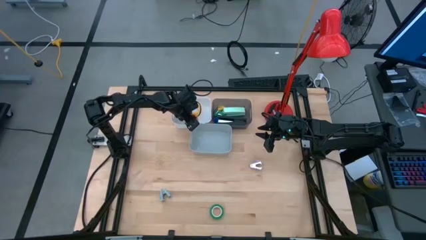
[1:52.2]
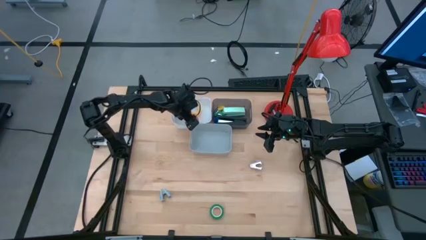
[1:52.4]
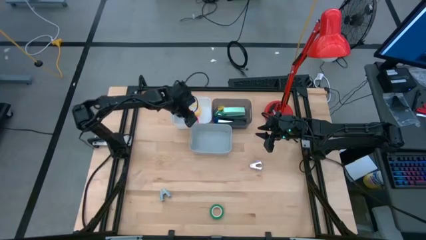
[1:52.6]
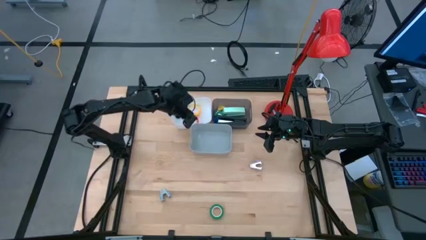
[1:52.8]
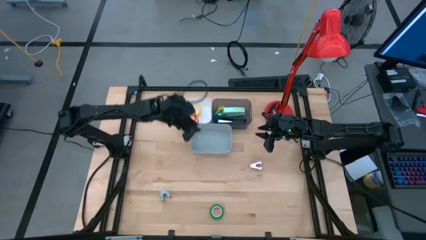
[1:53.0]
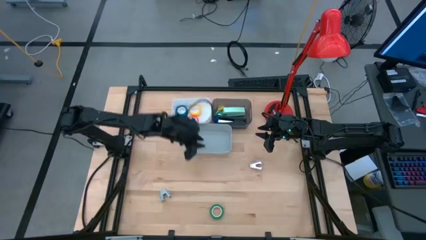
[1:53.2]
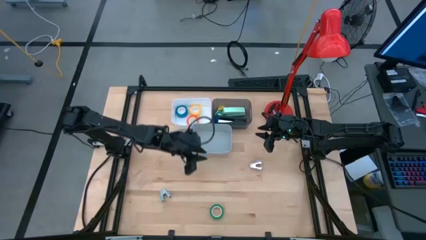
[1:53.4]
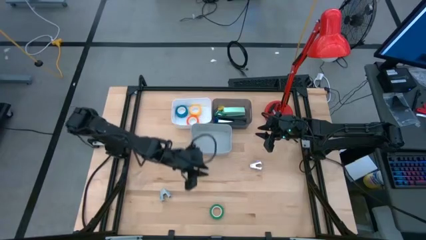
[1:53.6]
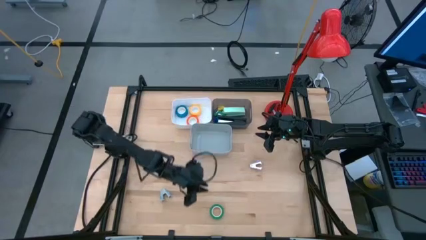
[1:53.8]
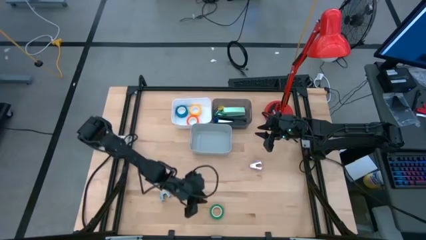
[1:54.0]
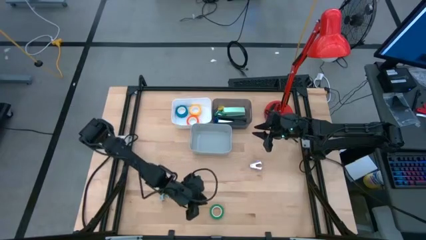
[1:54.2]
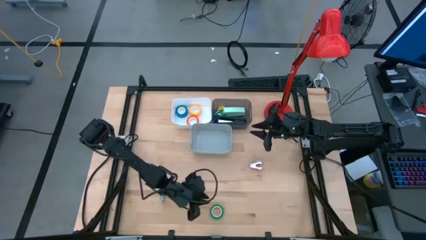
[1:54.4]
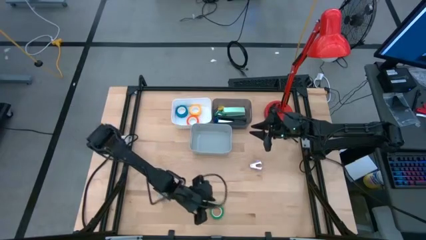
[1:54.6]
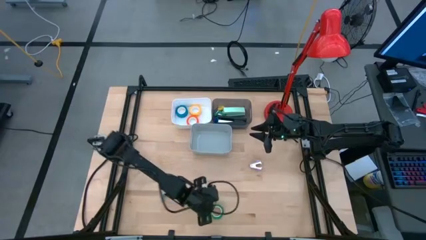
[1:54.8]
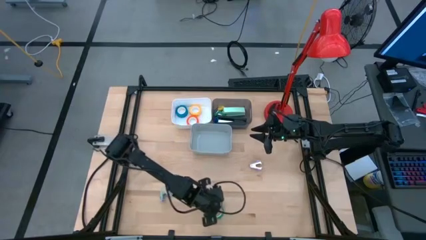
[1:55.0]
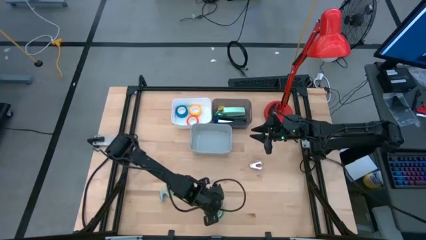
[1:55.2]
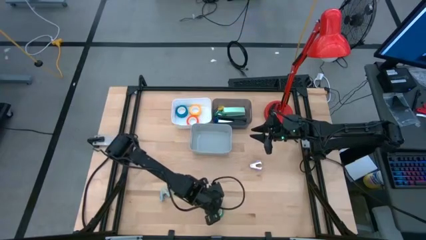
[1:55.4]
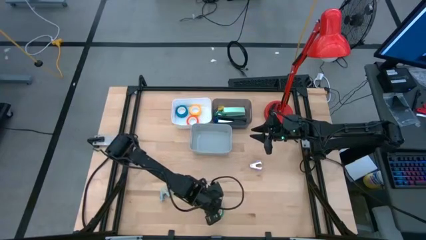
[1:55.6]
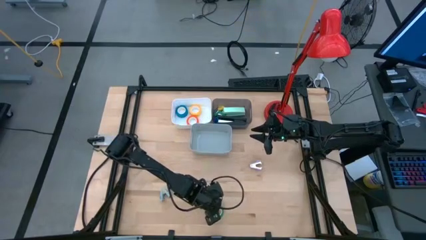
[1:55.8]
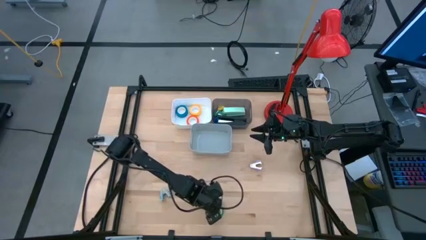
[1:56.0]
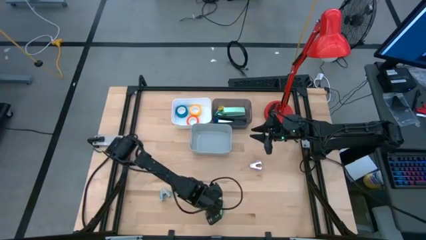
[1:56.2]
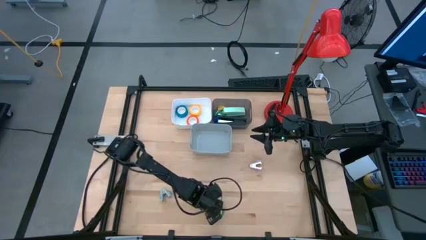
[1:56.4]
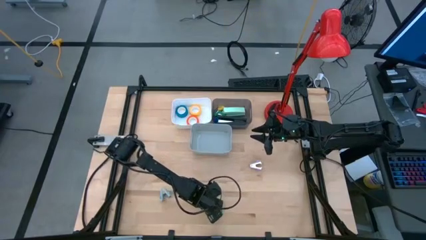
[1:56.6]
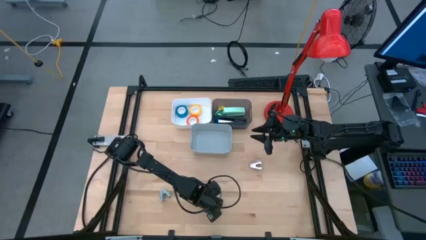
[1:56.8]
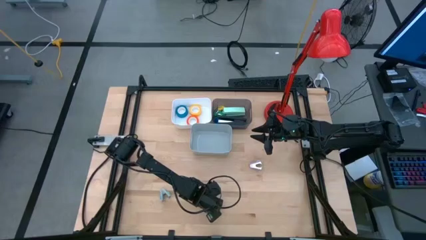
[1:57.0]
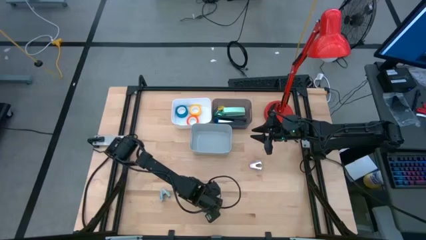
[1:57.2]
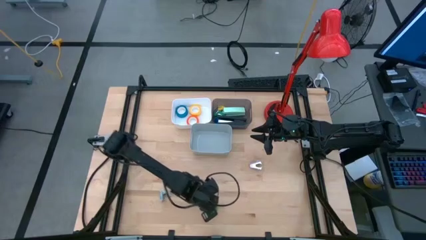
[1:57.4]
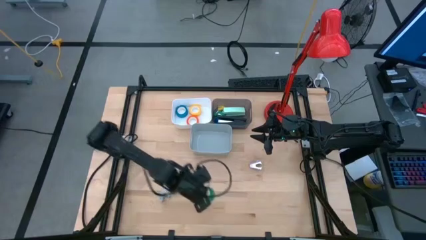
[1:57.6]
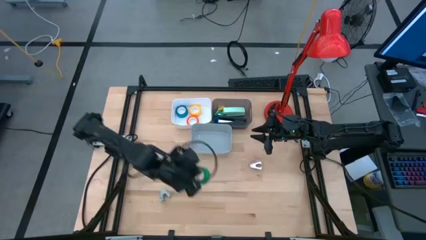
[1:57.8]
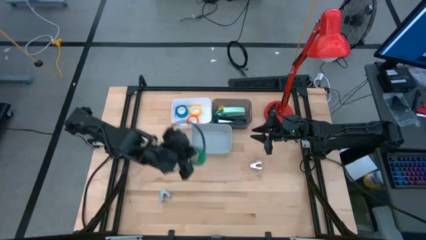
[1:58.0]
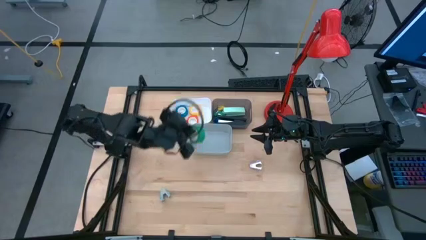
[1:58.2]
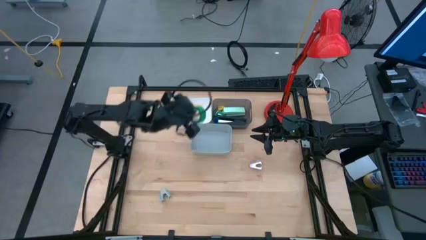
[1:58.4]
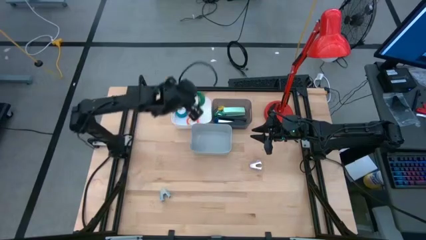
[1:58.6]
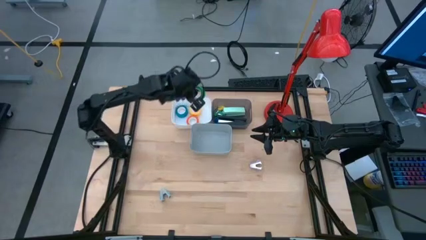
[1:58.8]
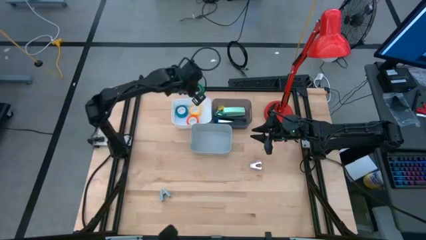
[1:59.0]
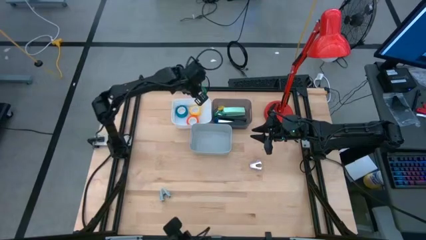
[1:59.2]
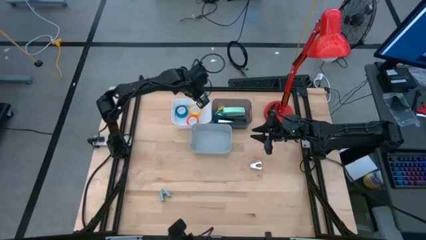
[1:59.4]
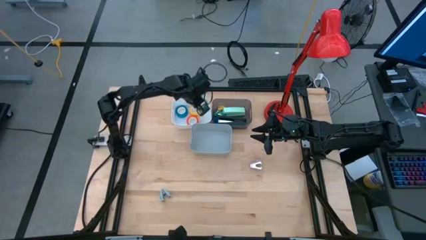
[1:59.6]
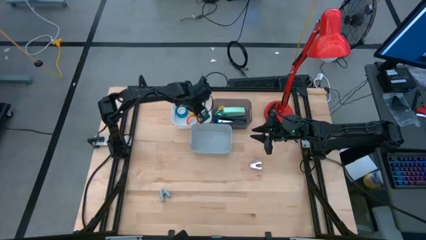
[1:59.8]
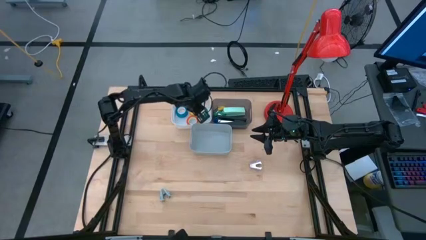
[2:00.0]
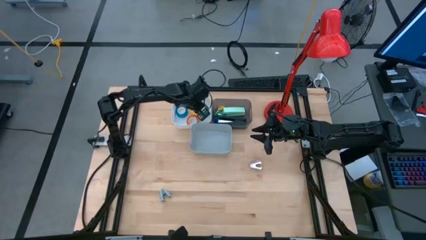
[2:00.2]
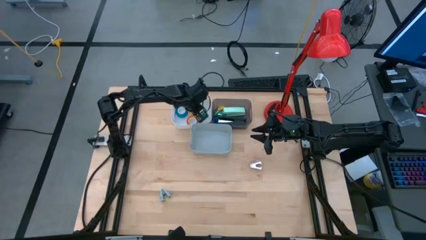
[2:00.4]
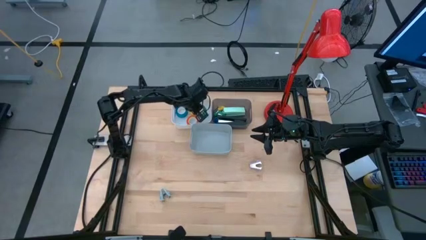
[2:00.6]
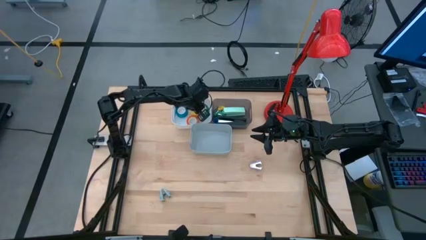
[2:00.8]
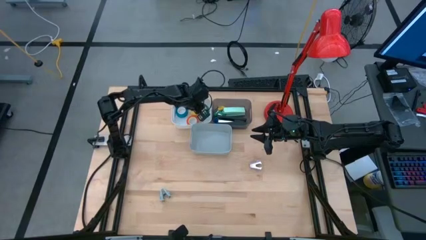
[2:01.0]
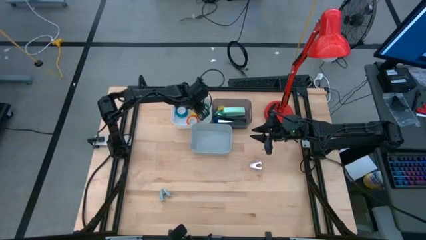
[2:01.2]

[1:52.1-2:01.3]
Task: Pick and place Stapler, Stapler remover, tape
Put the green tape into the white bin

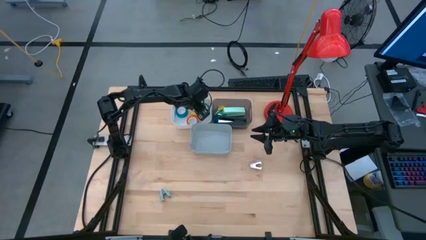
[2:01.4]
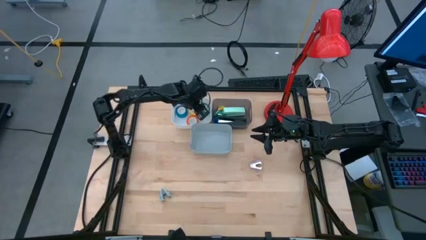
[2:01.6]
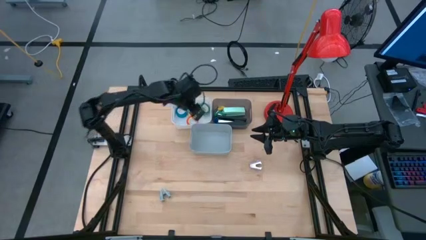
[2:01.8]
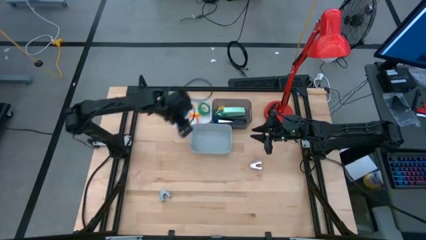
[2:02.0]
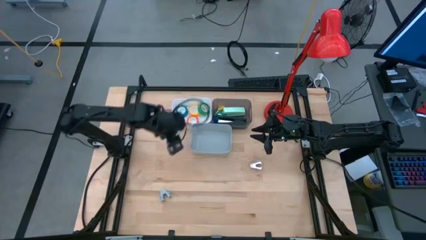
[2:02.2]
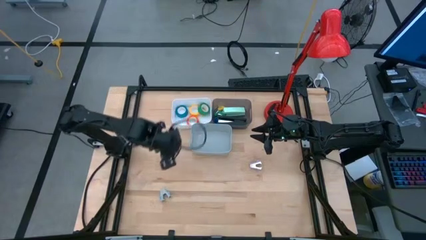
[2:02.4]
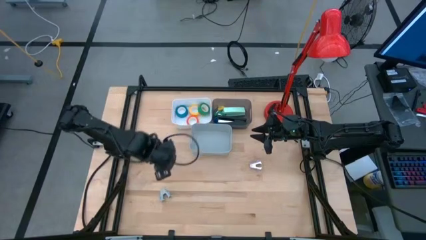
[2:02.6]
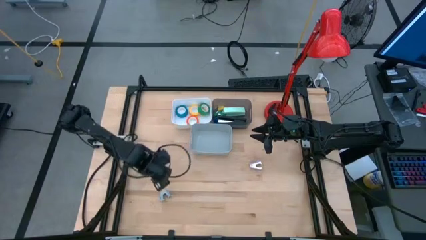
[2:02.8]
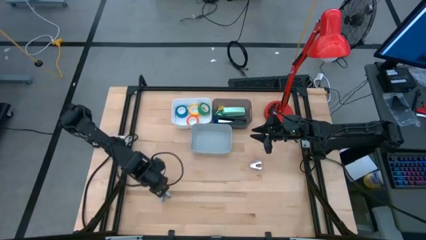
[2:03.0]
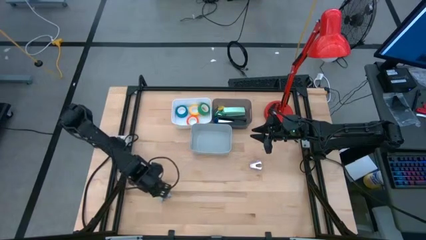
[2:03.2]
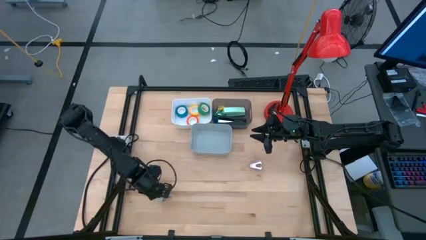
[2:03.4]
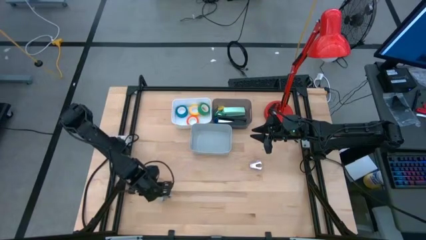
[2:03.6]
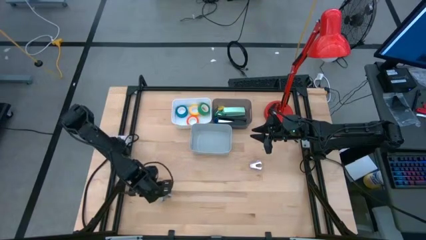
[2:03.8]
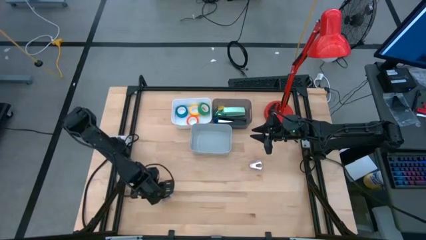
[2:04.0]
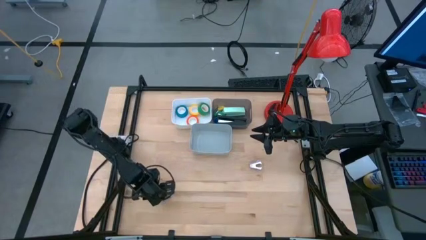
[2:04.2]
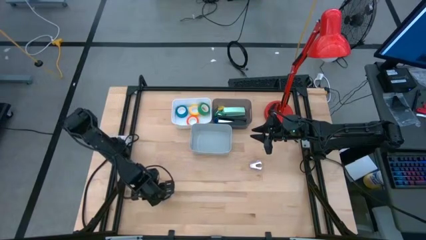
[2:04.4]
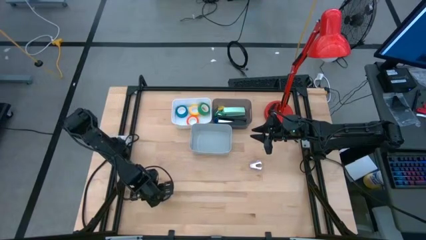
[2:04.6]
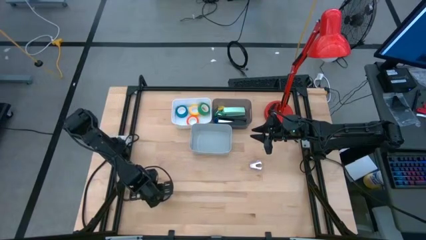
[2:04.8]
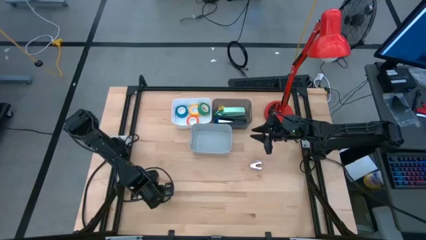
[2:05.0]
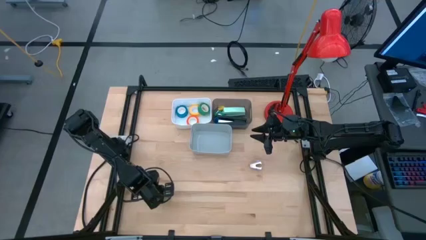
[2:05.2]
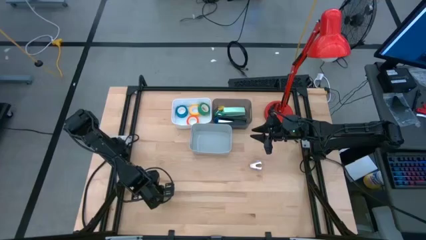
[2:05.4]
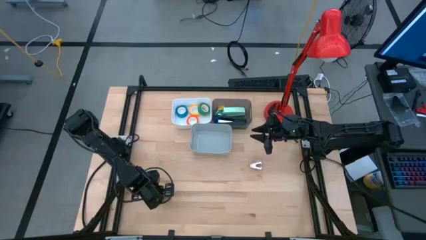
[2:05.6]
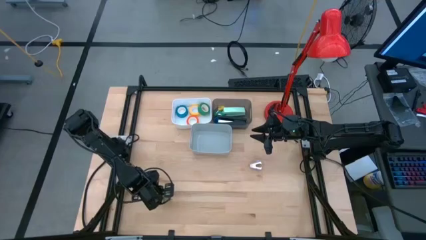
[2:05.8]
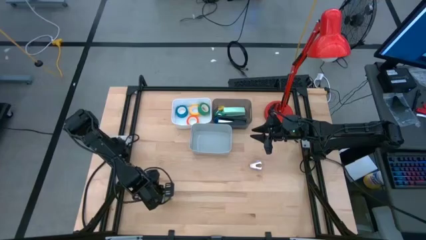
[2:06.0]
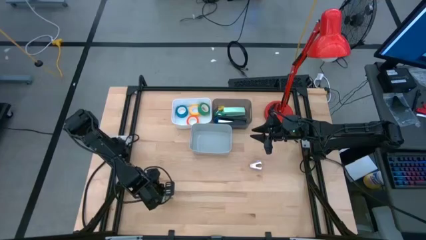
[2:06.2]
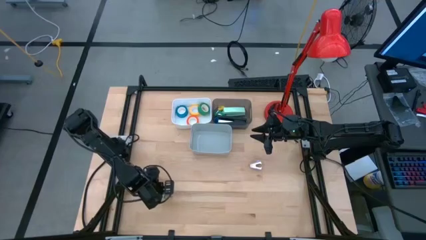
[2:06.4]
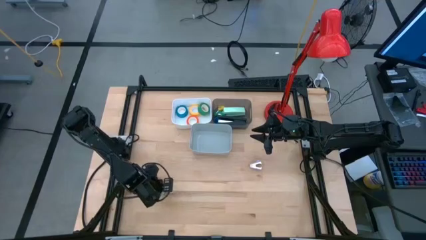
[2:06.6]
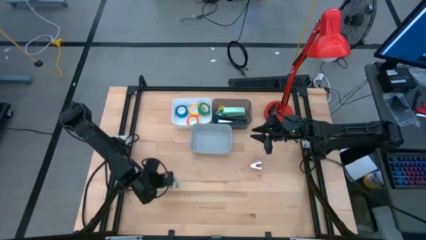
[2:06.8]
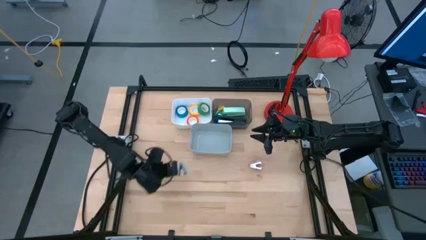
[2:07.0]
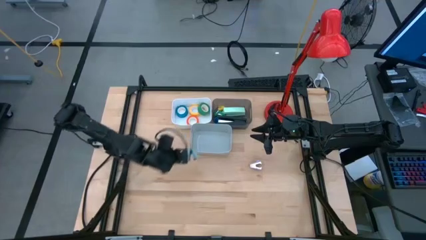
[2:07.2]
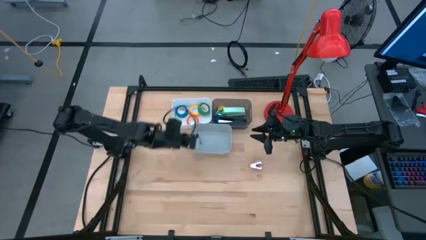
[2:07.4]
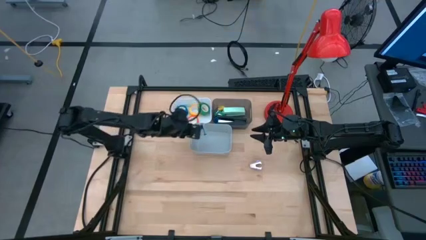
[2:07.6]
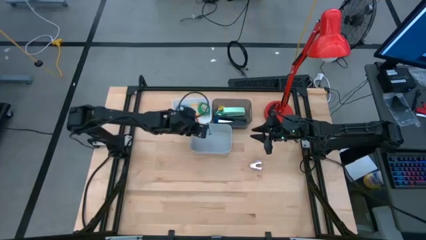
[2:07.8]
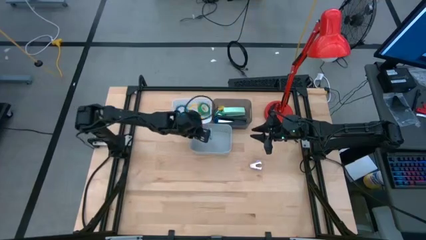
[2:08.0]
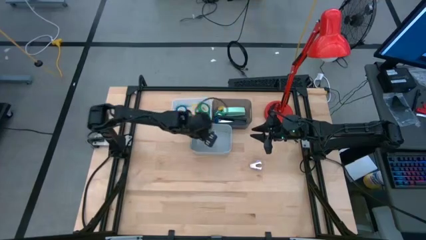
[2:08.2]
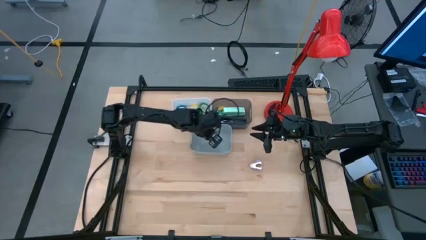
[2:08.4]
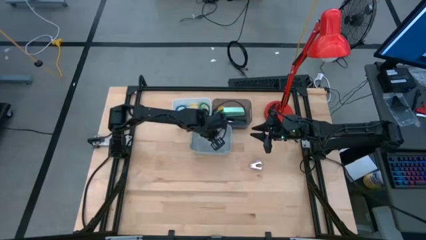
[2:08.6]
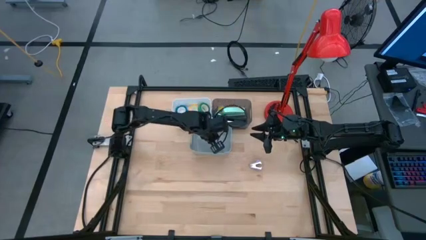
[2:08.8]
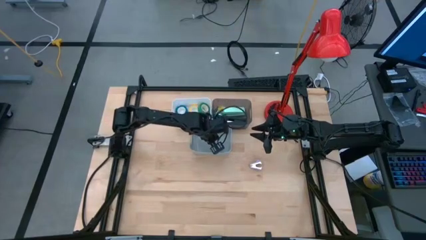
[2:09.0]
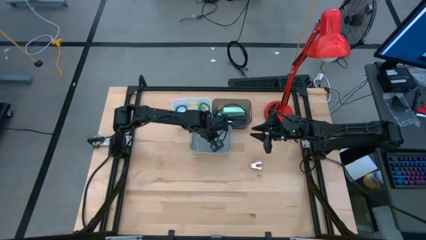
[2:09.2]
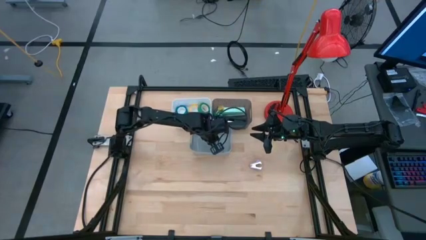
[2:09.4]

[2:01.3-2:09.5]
Put the light blue staple remover into the gray bin
